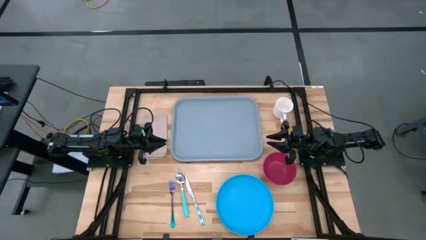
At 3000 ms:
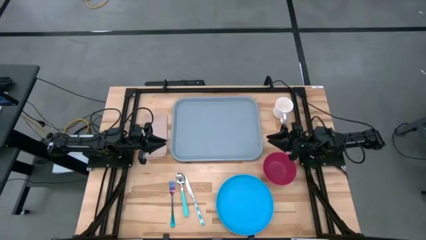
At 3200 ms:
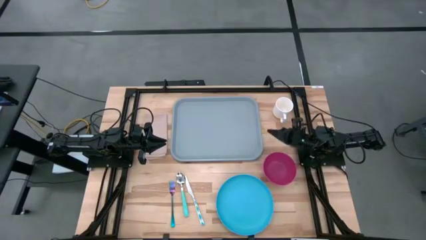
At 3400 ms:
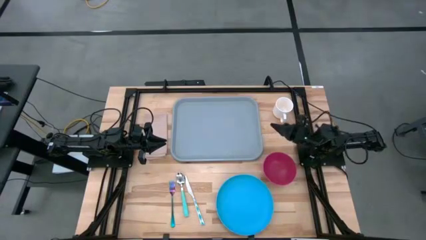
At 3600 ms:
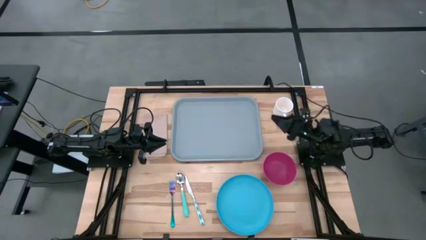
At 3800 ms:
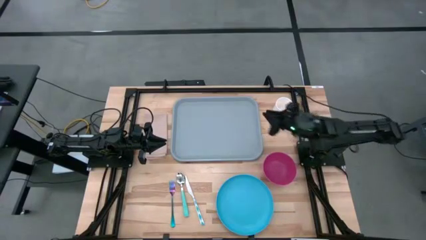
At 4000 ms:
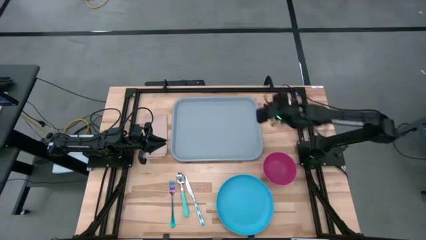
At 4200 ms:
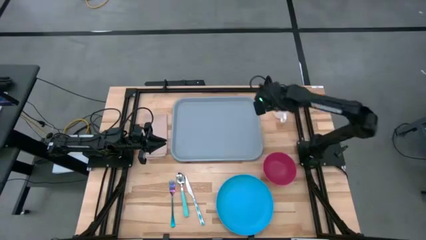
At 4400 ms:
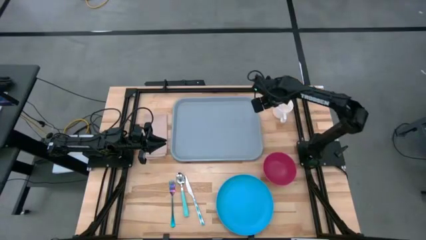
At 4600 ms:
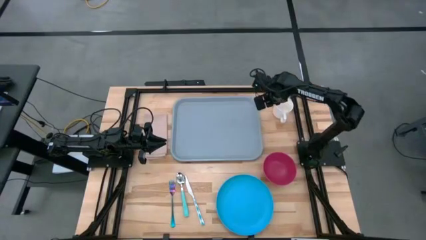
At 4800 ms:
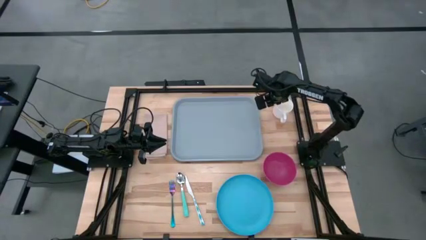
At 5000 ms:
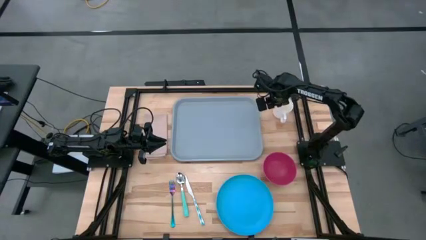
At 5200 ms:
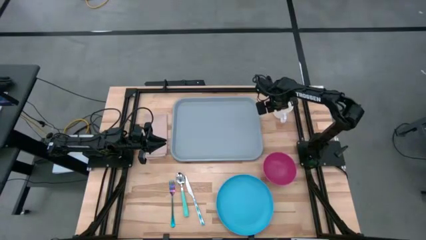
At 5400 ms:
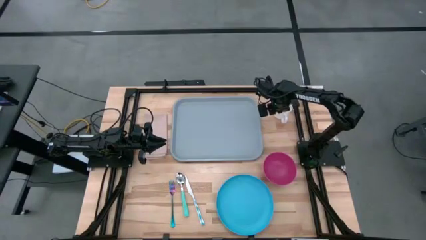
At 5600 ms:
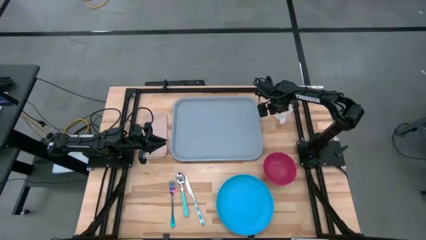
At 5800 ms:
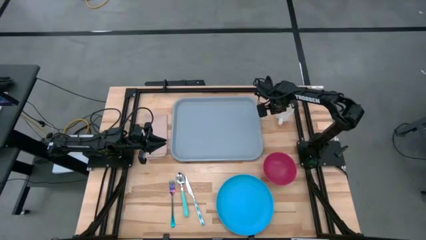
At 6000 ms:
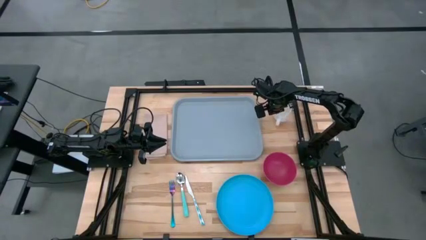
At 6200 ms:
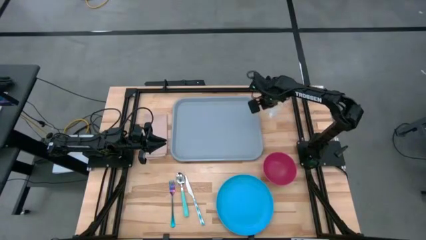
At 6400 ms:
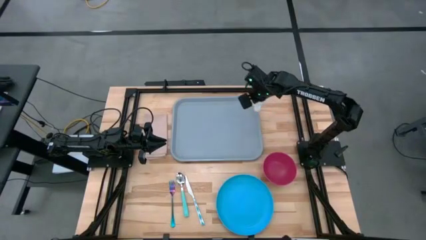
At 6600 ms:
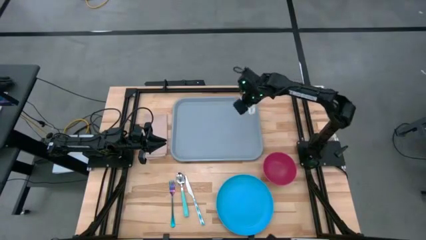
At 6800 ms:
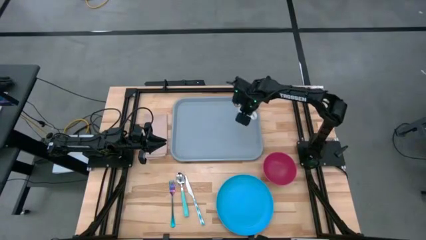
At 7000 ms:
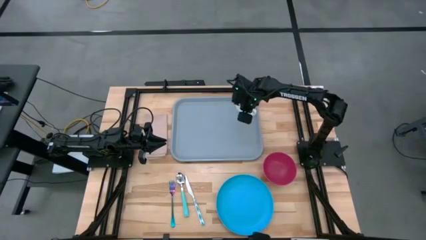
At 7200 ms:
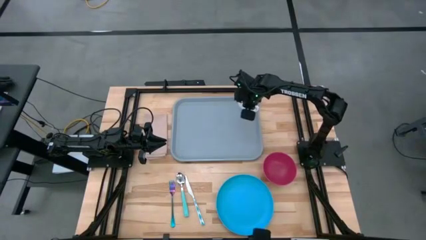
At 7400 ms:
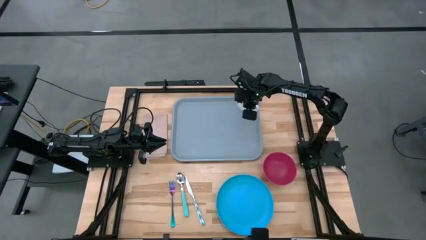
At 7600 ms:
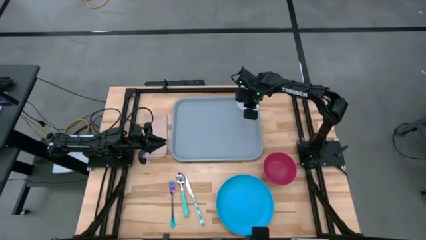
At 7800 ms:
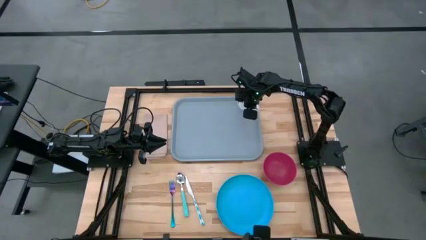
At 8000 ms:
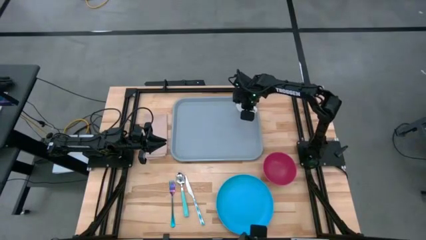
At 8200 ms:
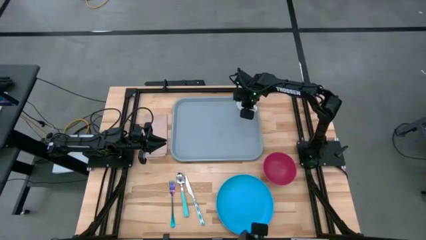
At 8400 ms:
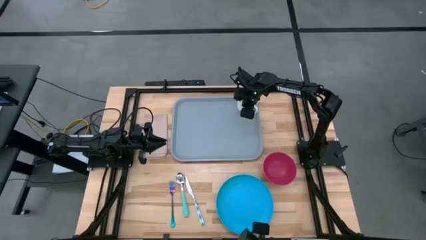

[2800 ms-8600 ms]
Task: Set up tray
Put the white mug on the top right of the blue tray

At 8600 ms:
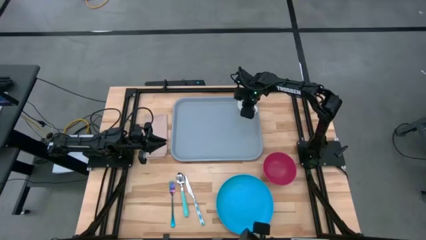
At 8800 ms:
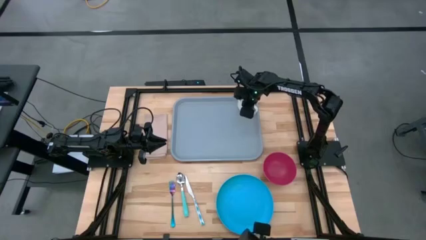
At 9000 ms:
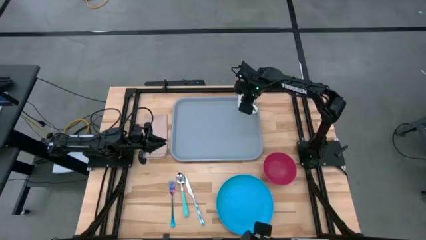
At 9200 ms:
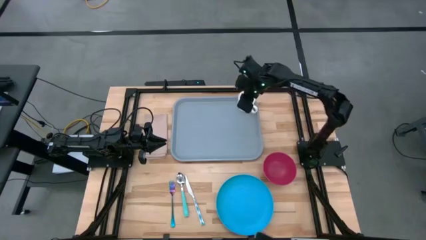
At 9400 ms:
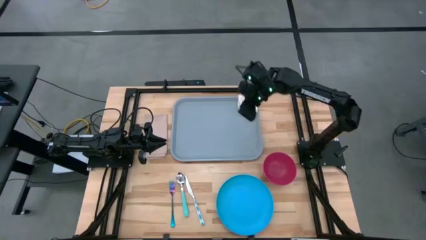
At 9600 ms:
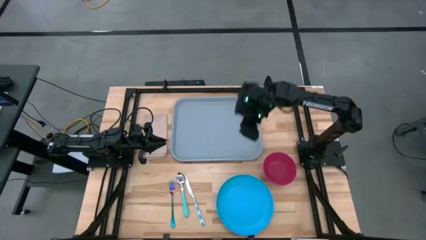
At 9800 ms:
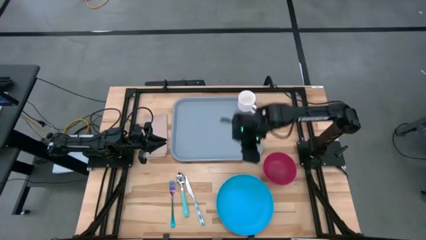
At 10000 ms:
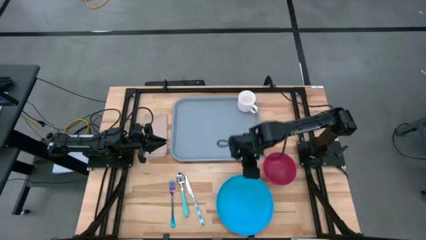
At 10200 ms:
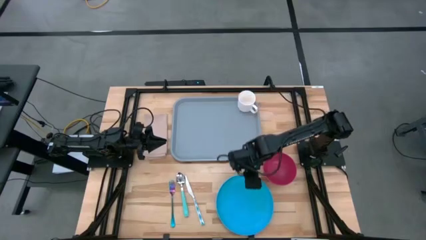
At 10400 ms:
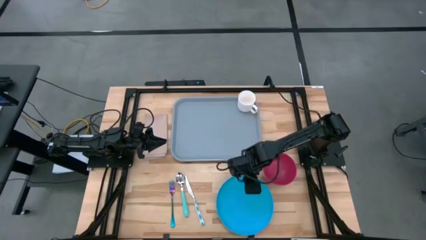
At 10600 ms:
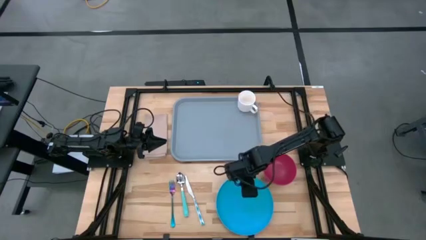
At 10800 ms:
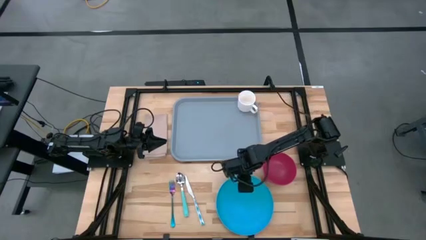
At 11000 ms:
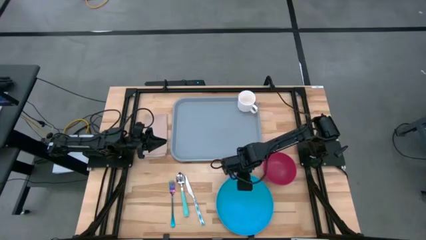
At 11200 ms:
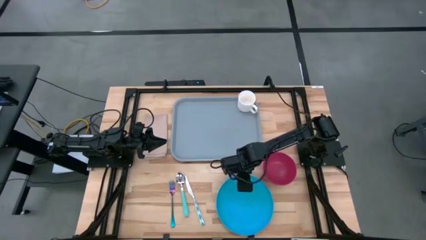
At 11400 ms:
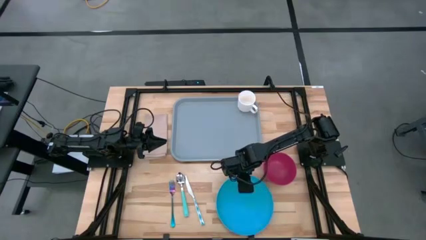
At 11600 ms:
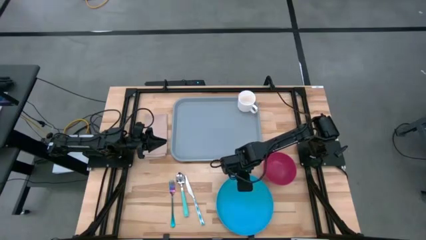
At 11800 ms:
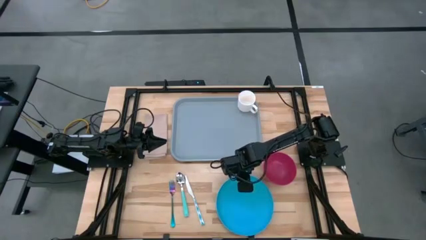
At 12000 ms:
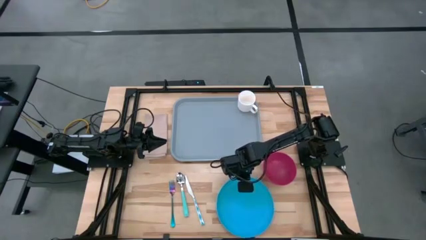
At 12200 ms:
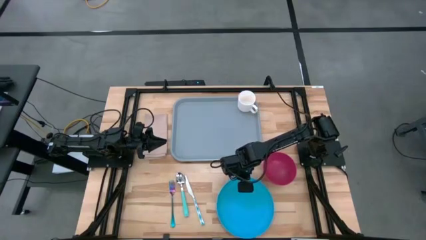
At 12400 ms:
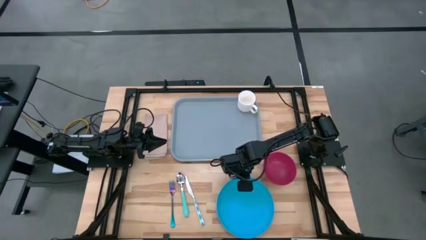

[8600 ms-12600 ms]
Put the blue plate on the bottom right of the blue tray

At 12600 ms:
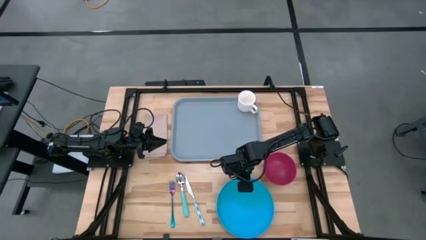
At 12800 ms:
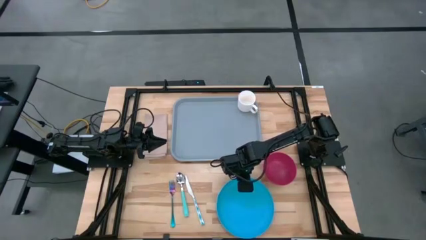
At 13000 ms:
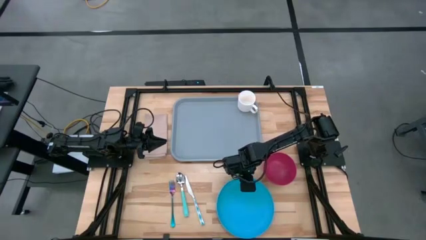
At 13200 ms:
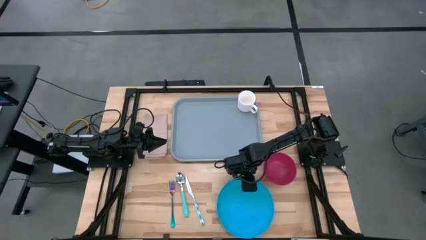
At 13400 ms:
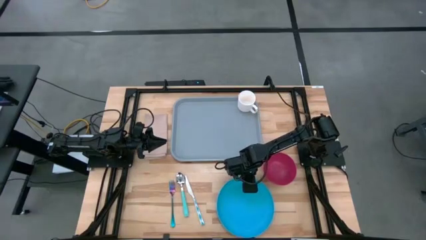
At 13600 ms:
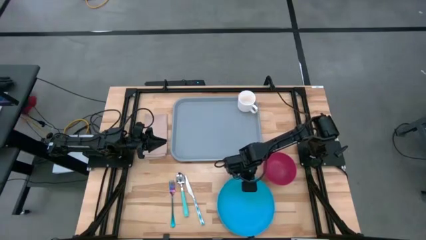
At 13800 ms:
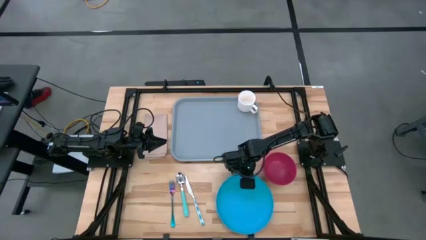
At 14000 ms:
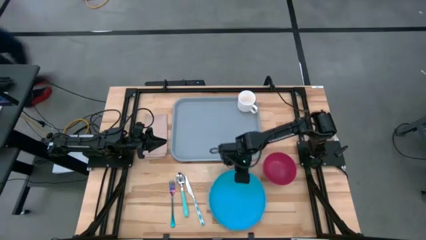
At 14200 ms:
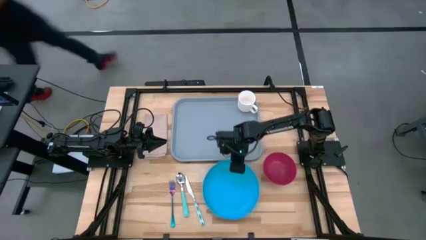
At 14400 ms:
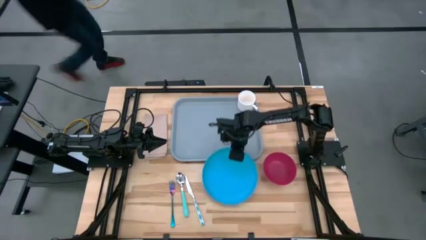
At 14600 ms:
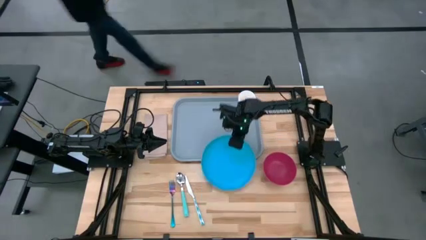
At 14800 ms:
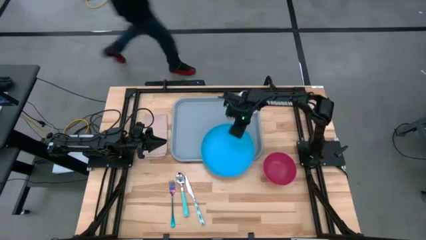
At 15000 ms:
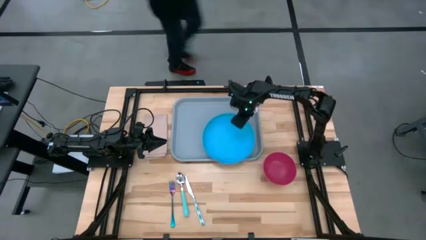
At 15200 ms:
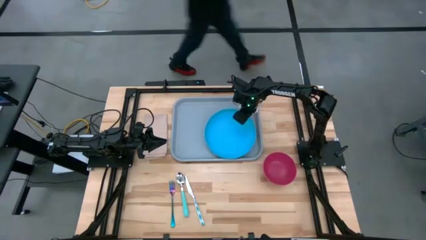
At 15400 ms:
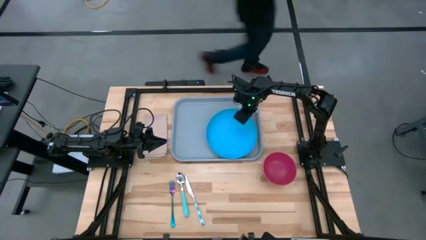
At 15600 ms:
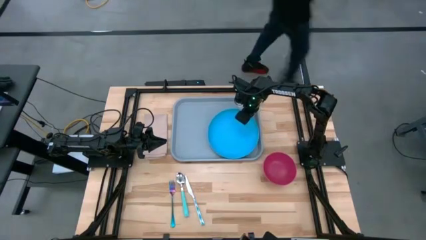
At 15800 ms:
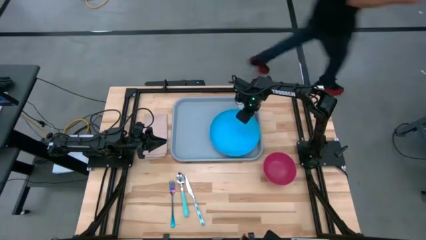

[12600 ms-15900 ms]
Put the blue plate on the bottom right of the blue tray

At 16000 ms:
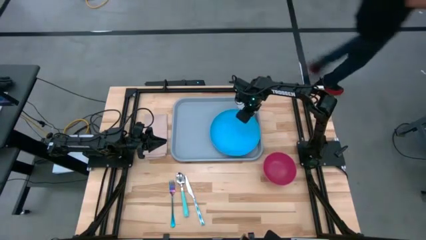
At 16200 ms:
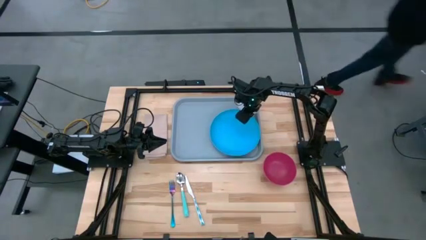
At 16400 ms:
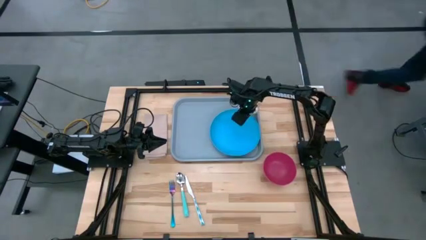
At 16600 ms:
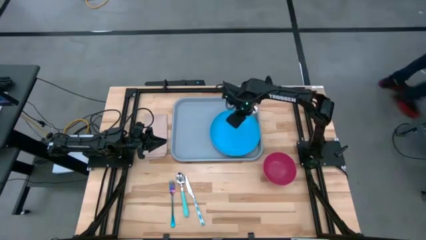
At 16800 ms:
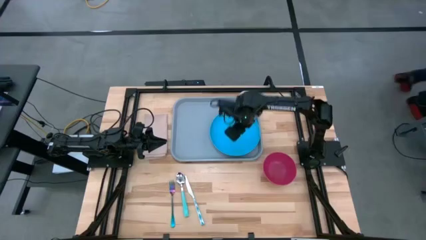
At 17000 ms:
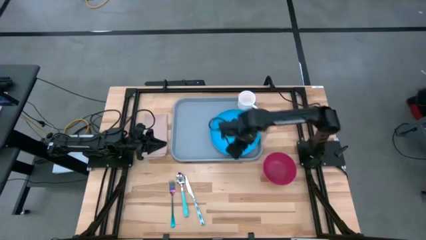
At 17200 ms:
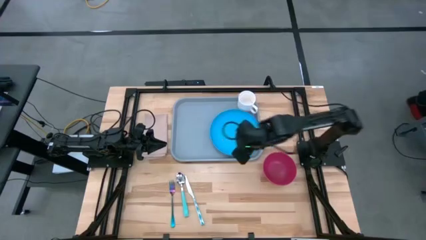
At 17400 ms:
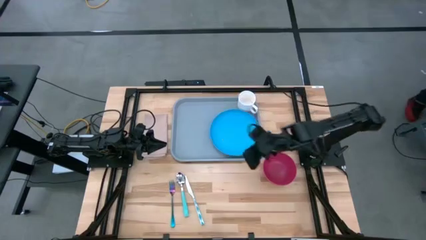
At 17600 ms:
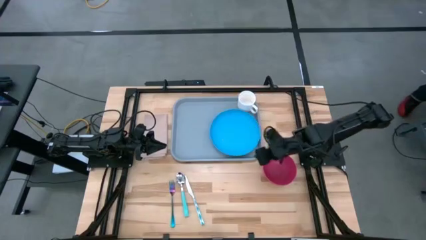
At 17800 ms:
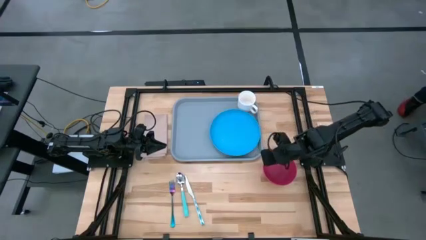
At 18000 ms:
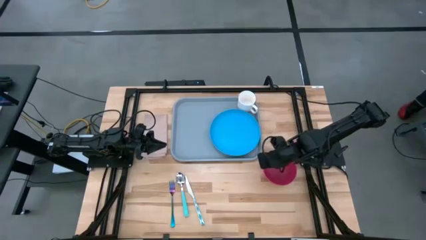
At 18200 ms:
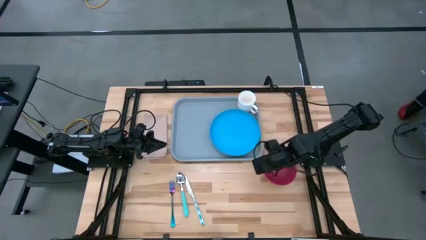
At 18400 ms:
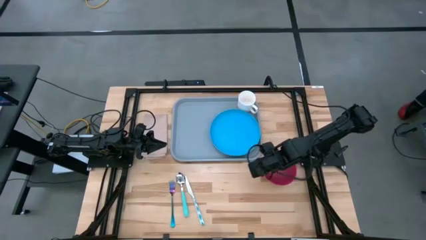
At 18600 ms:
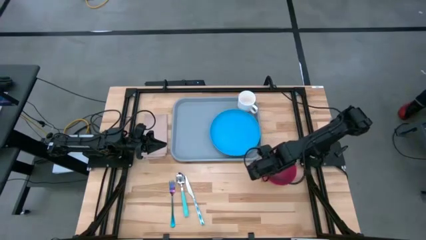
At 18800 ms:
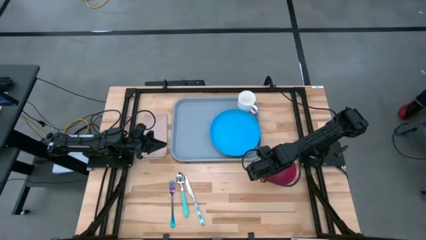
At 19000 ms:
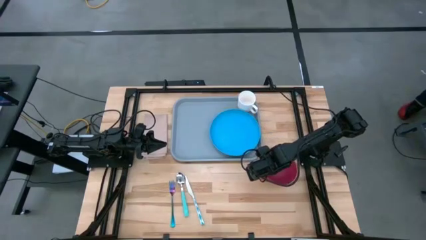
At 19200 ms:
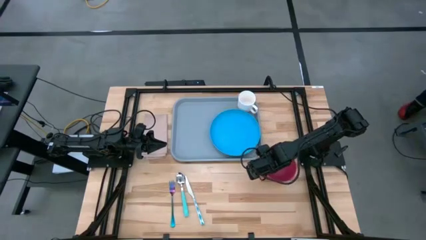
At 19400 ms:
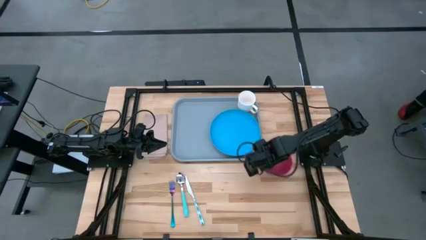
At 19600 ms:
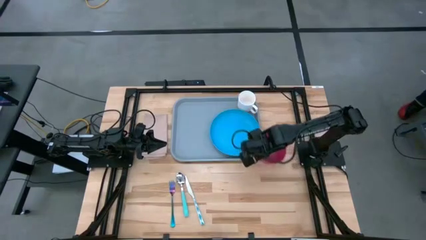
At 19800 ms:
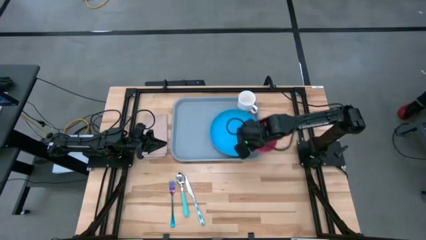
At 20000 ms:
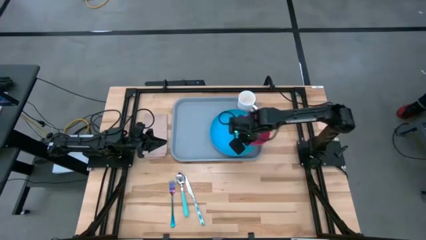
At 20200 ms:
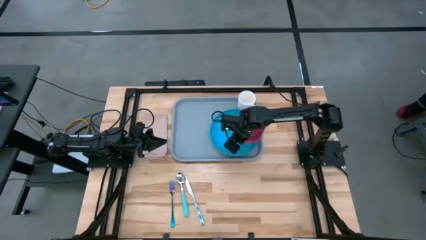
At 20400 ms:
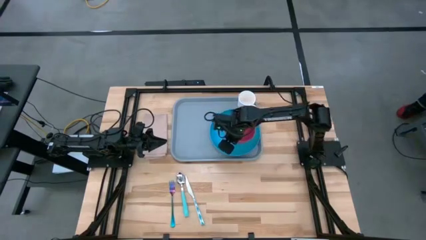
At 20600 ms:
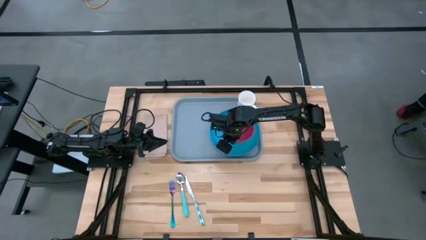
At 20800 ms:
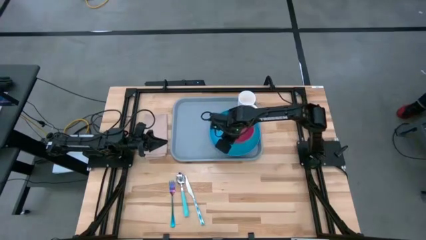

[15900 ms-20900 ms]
Stack the red bowl on top of the blue plate on the tray
